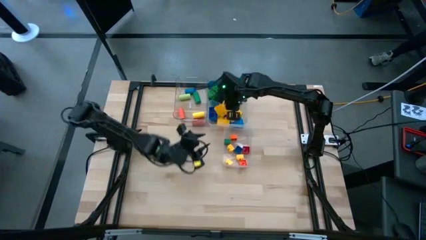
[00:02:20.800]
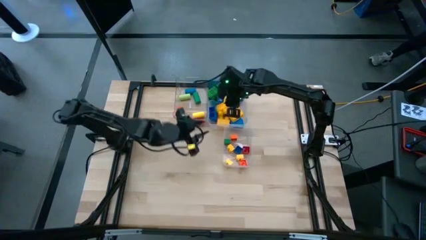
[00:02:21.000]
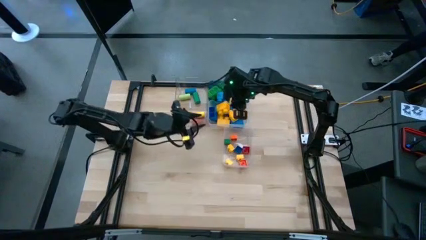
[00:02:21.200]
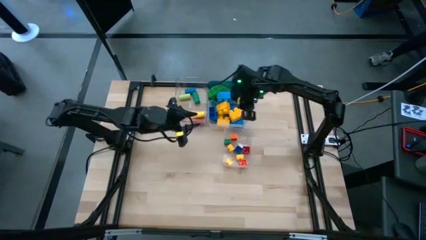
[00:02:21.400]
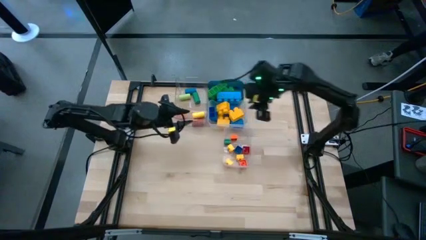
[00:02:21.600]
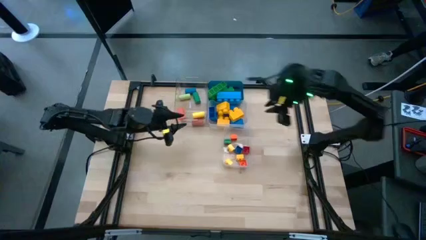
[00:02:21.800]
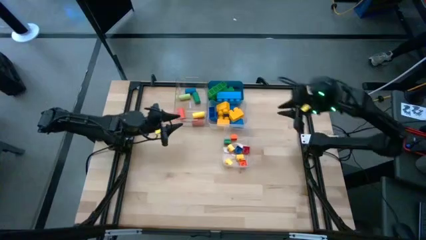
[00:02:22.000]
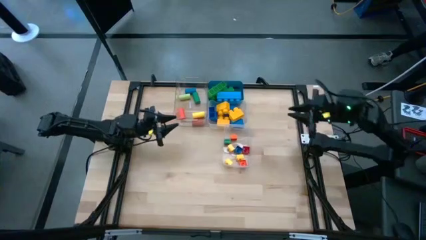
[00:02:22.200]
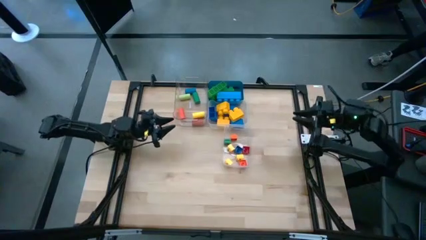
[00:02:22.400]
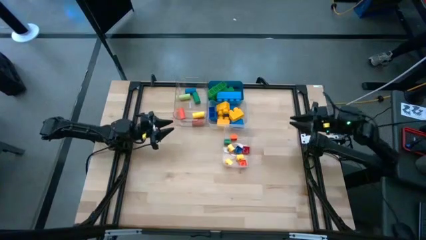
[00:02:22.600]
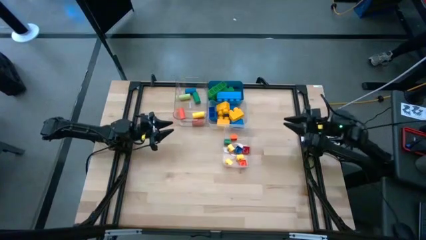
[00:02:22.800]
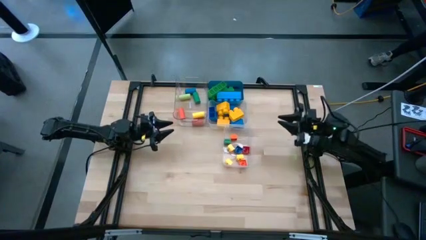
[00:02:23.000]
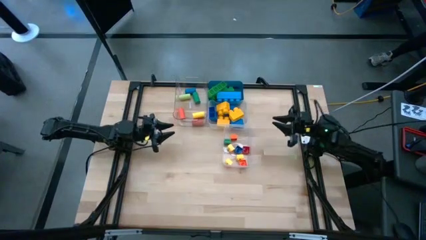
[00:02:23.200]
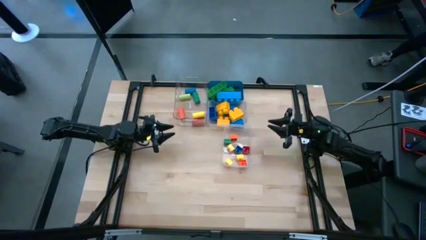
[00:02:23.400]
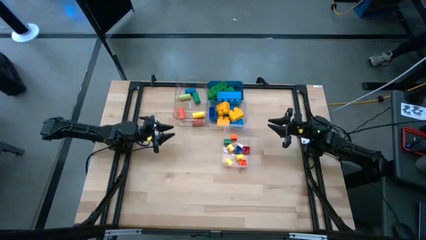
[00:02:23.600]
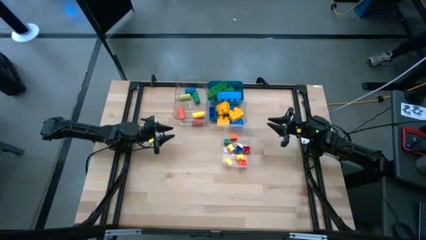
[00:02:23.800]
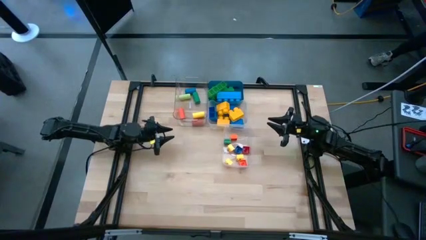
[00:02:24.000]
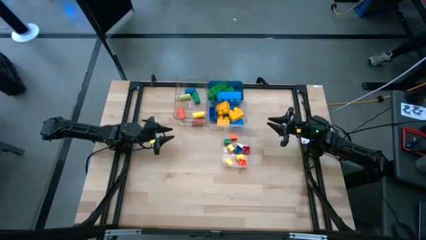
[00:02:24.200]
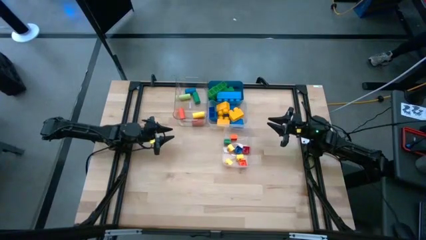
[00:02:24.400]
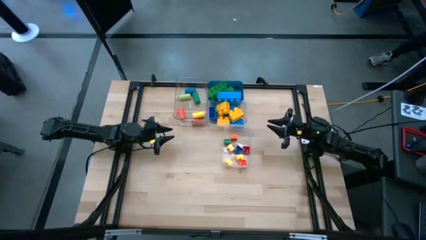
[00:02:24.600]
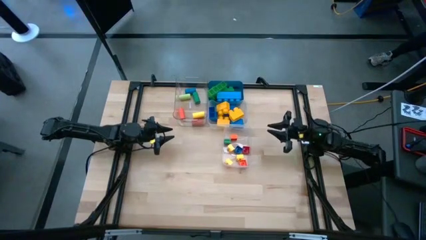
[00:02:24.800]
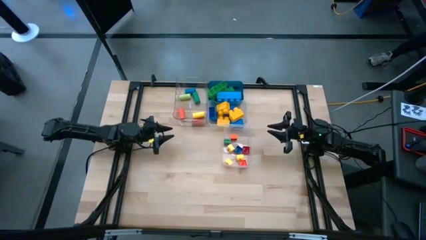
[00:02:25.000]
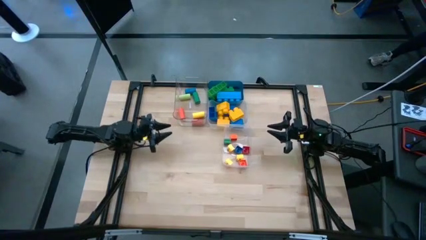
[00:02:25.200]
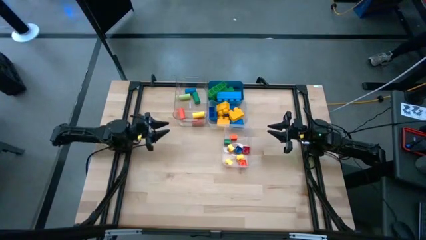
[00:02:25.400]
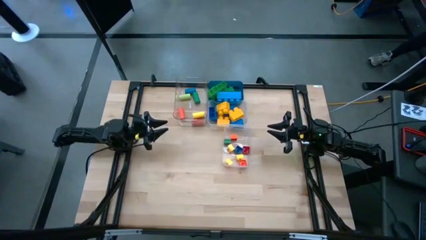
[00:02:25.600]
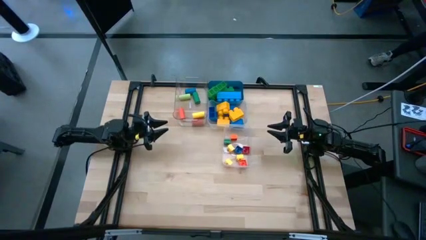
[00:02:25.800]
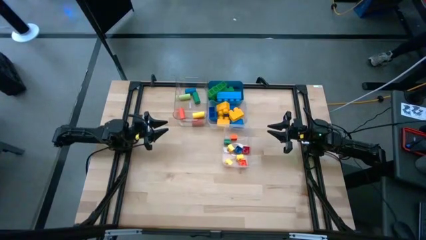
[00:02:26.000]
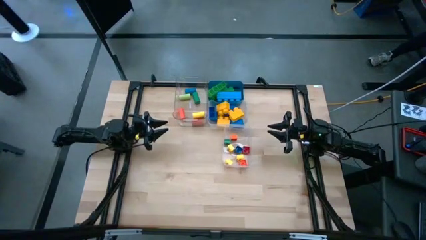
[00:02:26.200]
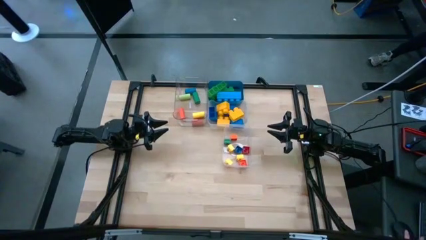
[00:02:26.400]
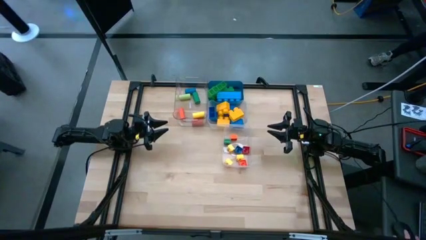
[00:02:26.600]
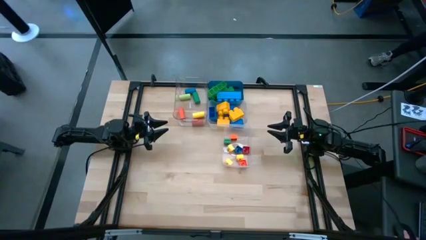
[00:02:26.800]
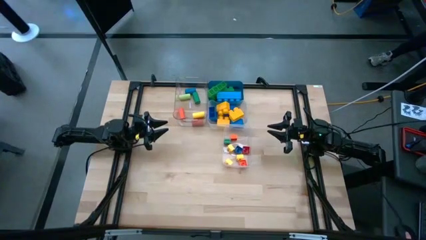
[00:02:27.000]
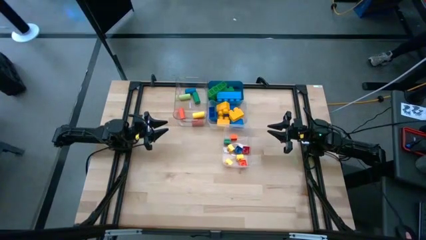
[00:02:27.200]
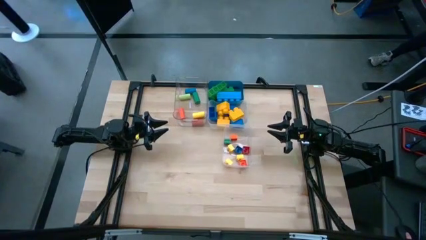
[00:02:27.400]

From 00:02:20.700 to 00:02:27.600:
Task: Sort blocks by size
Return to Home Position
